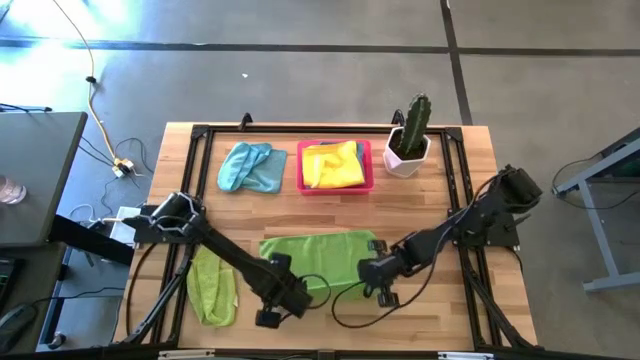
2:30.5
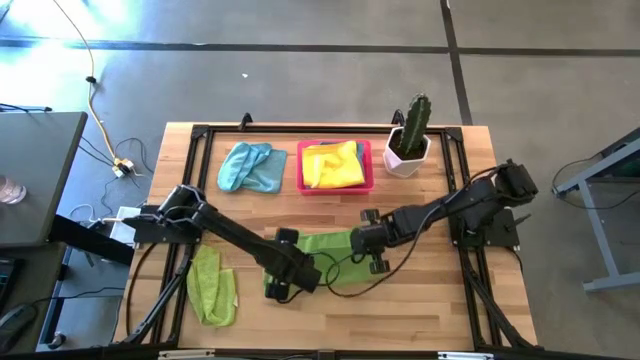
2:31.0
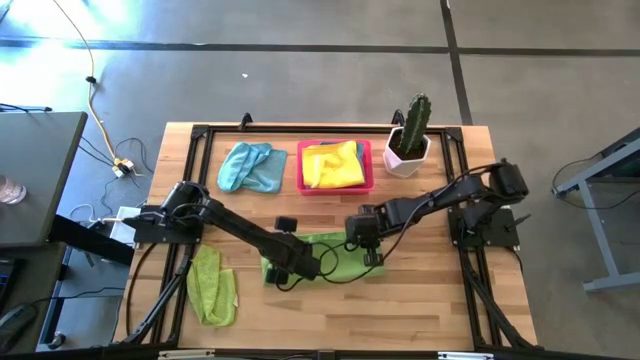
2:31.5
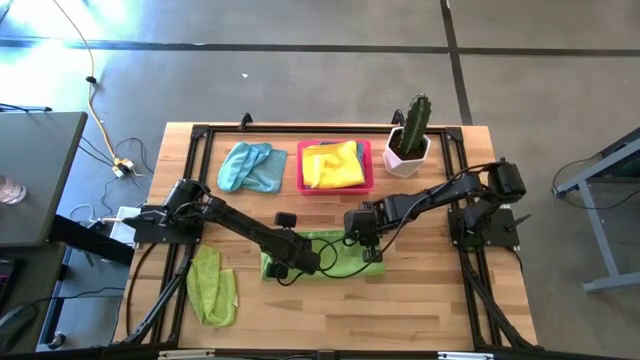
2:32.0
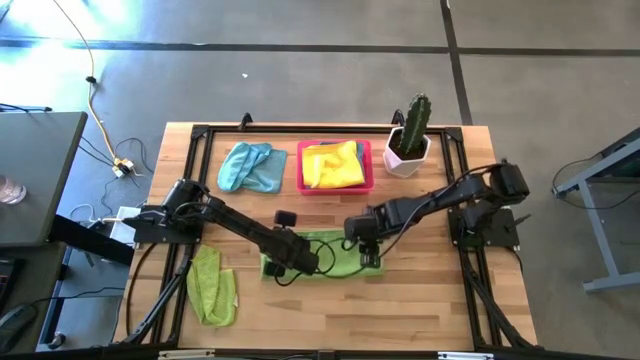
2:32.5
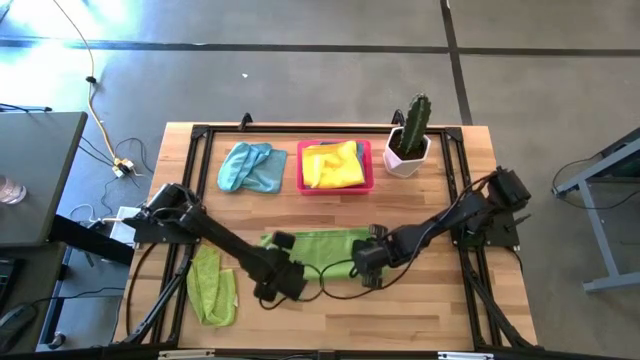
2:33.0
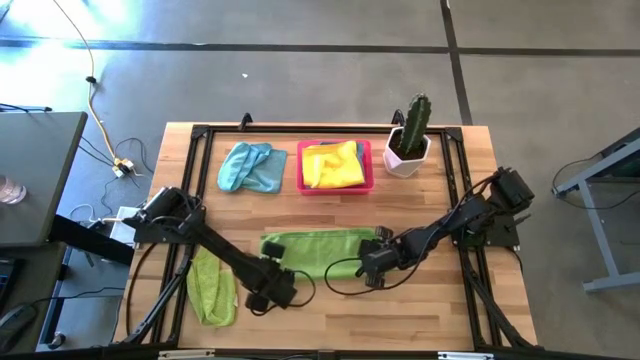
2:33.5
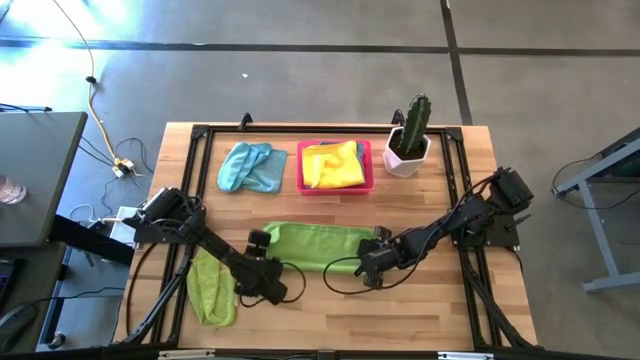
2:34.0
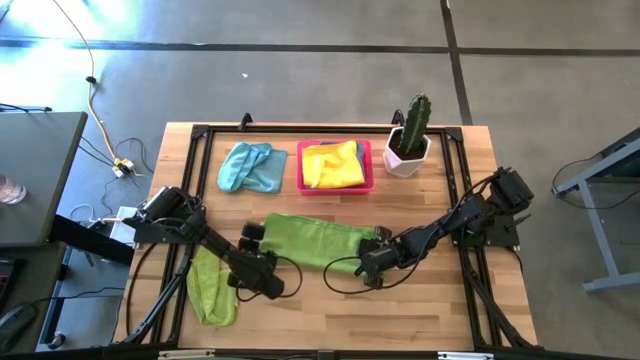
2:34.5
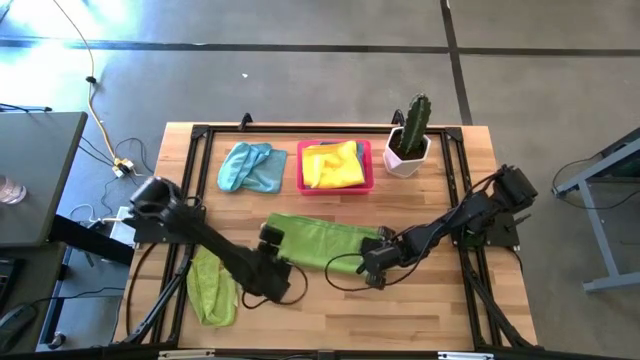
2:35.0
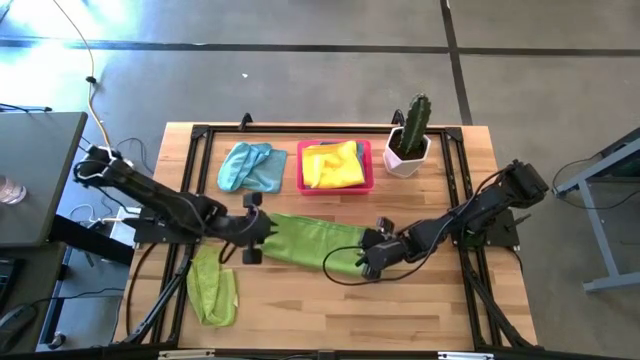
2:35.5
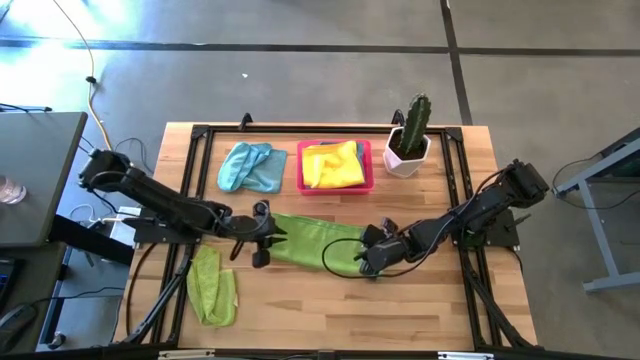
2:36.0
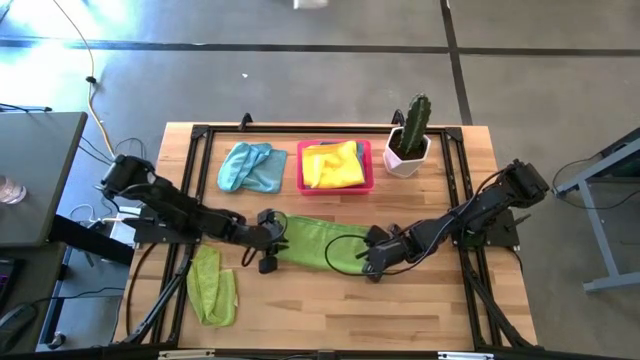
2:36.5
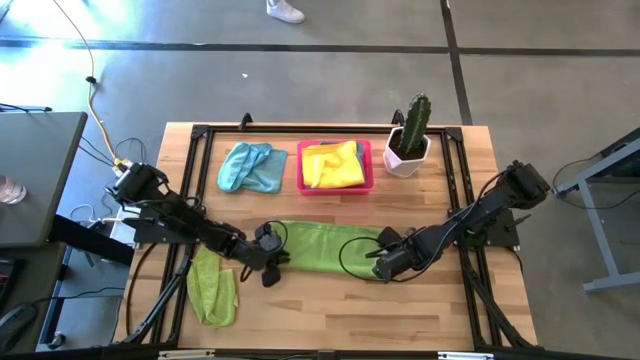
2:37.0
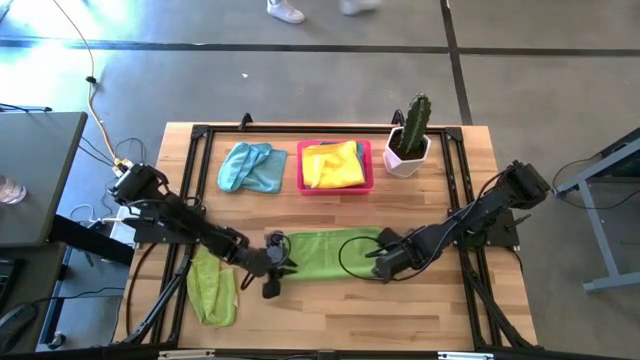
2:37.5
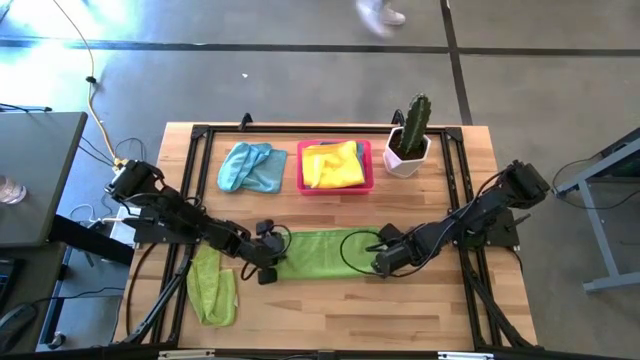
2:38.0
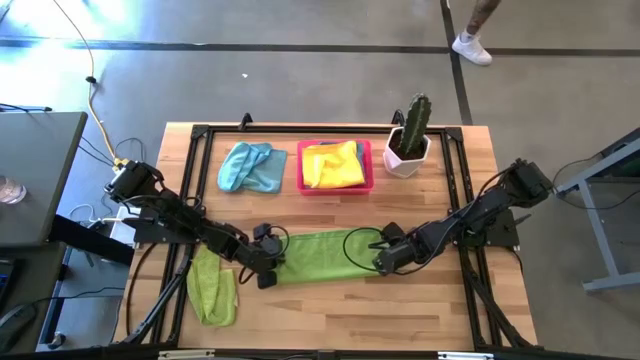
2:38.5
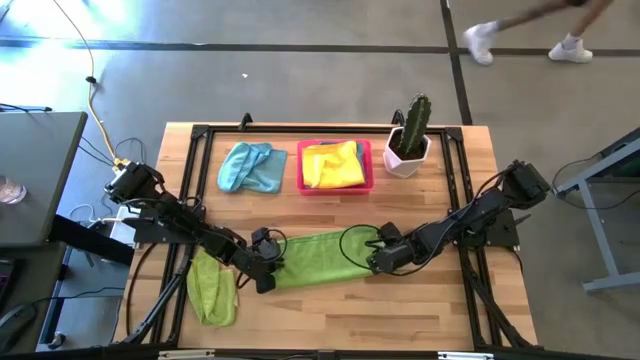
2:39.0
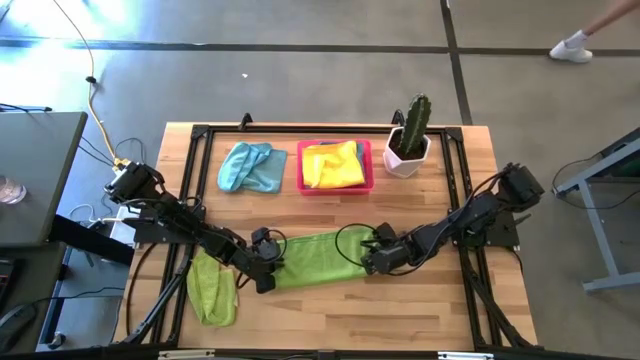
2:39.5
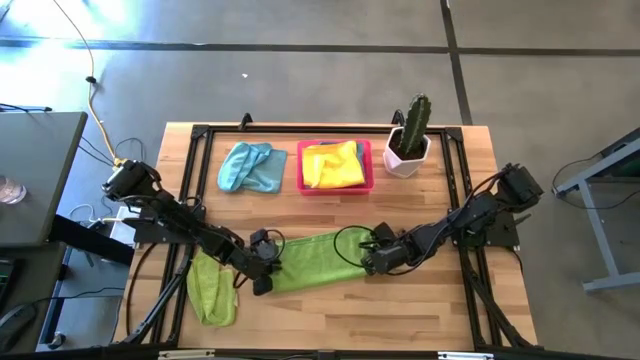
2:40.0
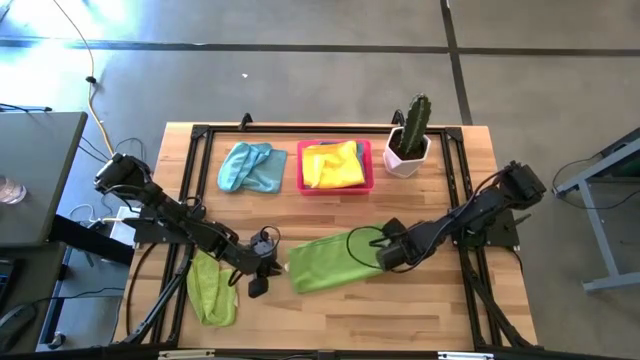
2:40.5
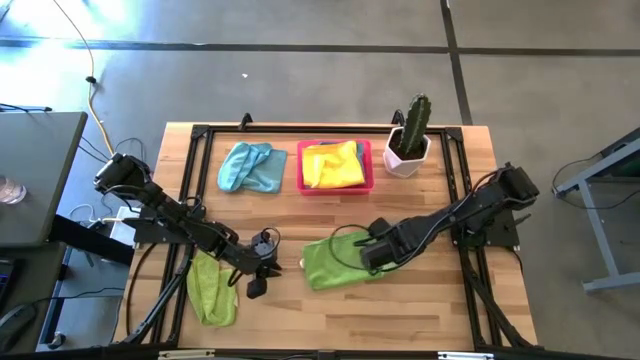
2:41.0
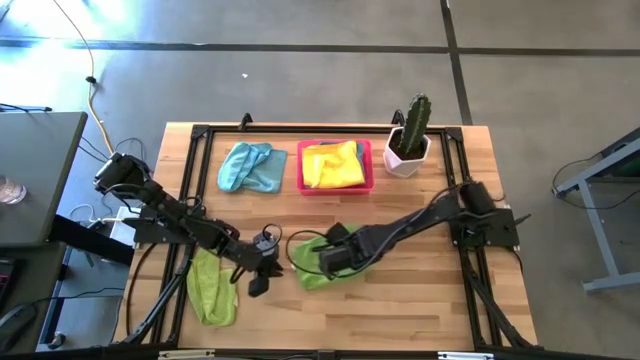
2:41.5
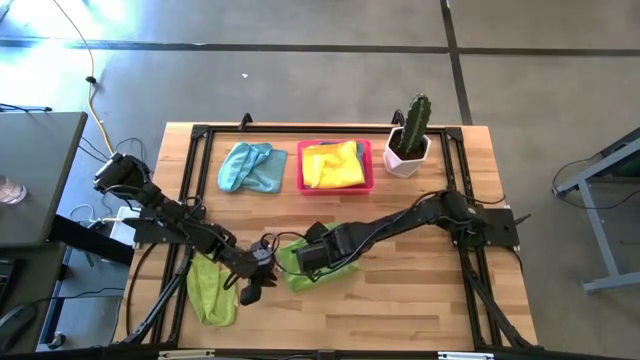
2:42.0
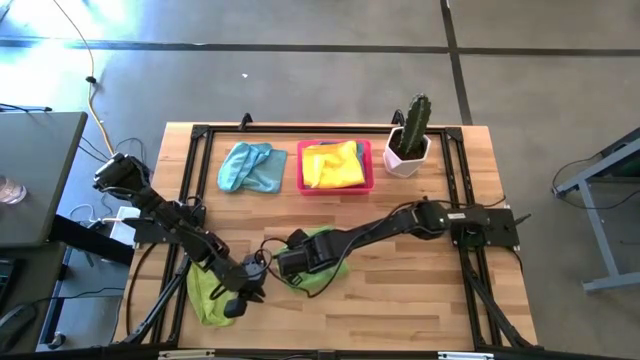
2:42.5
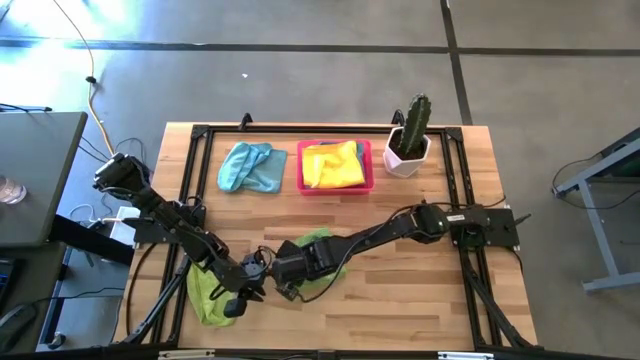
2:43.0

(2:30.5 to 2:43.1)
Task: Fold microfiber towels
Fold the green microfiber cloth

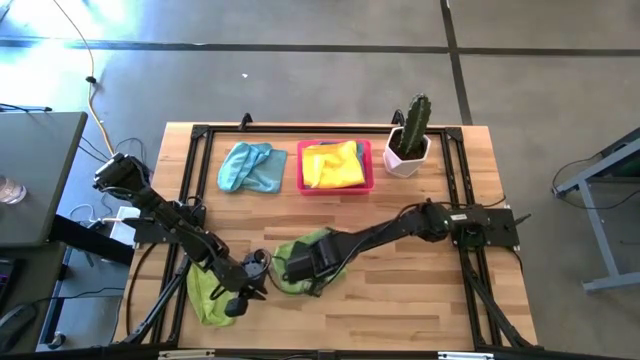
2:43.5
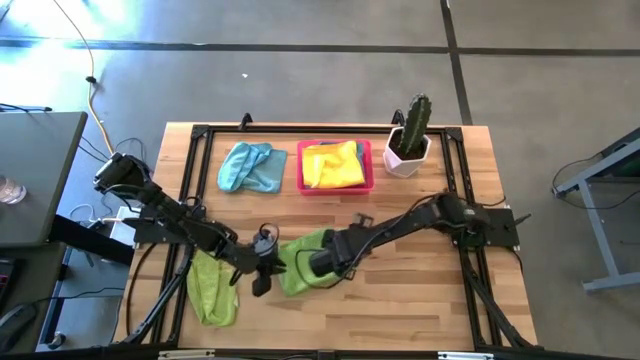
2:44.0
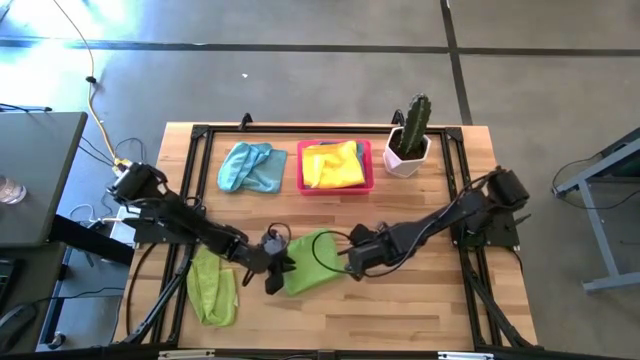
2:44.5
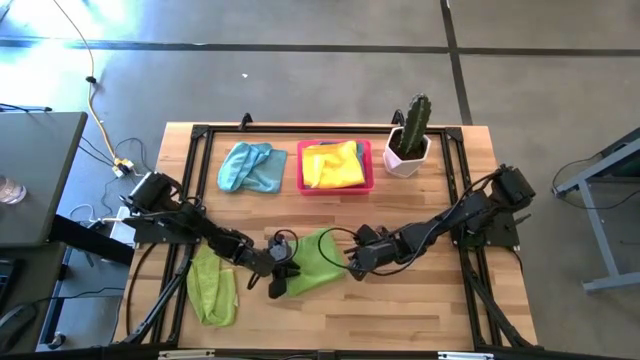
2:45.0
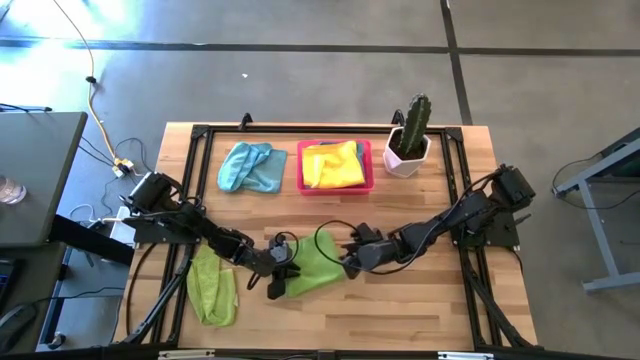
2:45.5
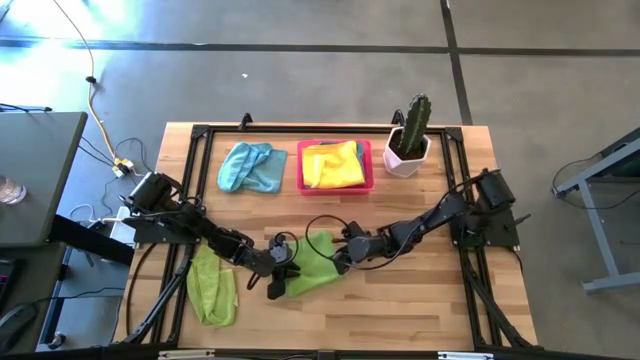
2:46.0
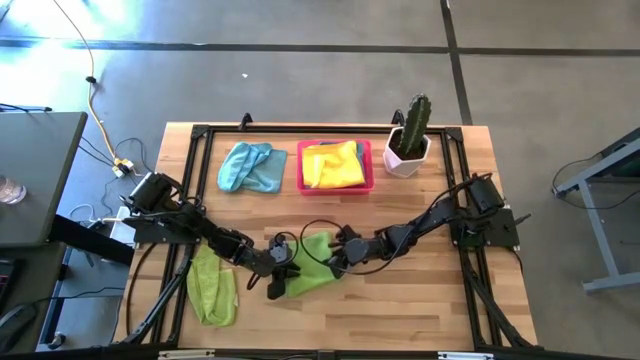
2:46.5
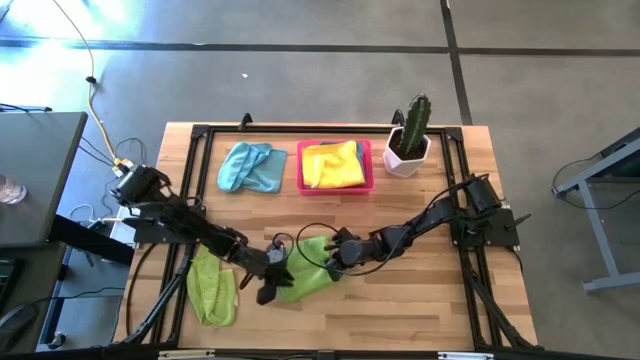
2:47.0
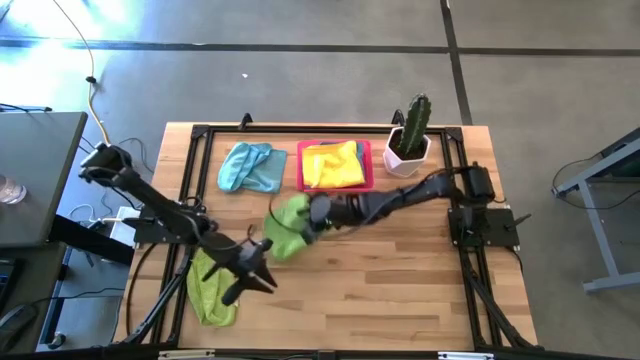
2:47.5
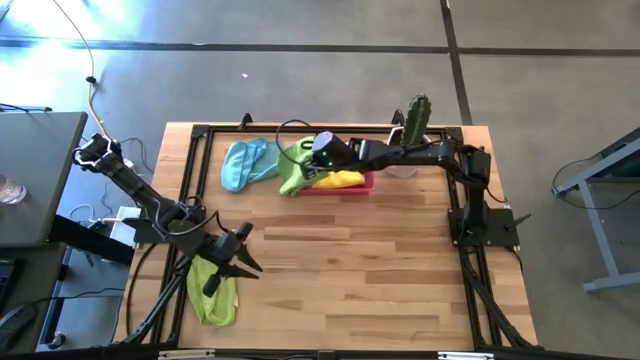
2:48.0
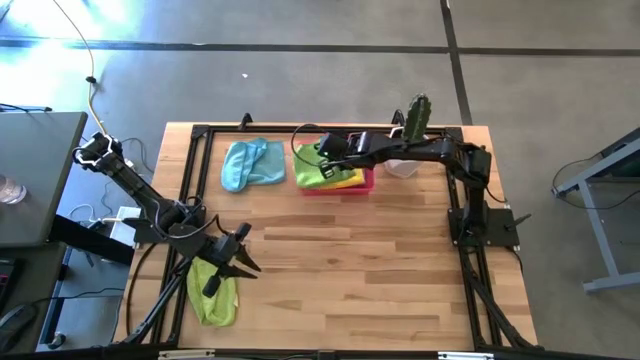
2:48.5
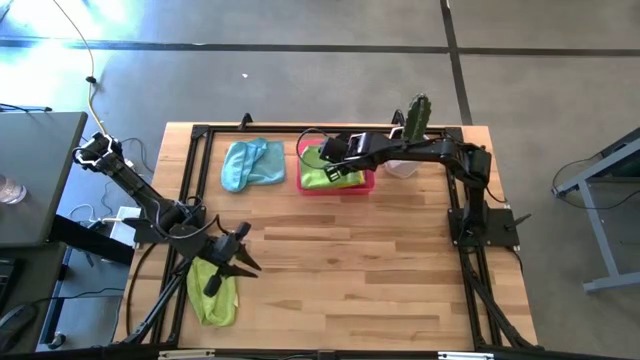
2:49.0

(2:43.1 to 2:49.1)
Stack the folded green microfiber cloth on top of the yellow microfiber cloth in the pink bin

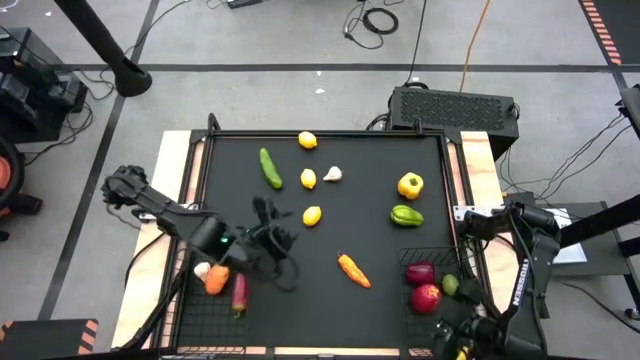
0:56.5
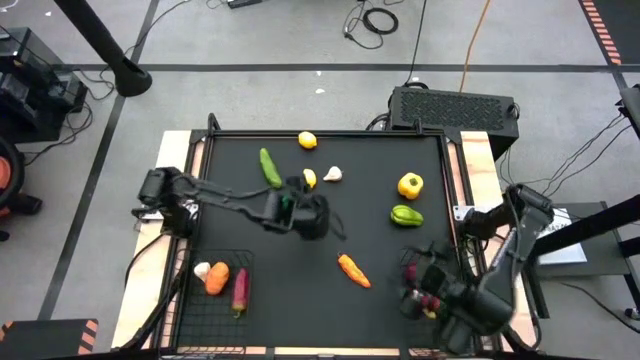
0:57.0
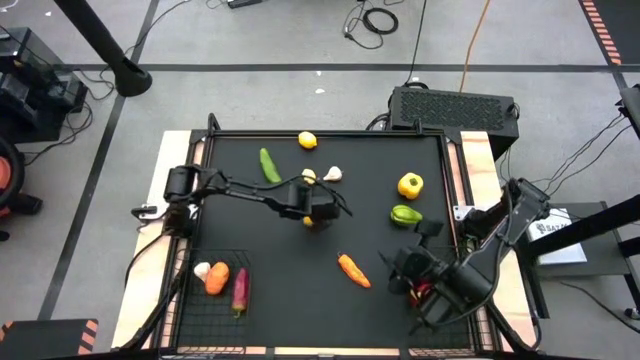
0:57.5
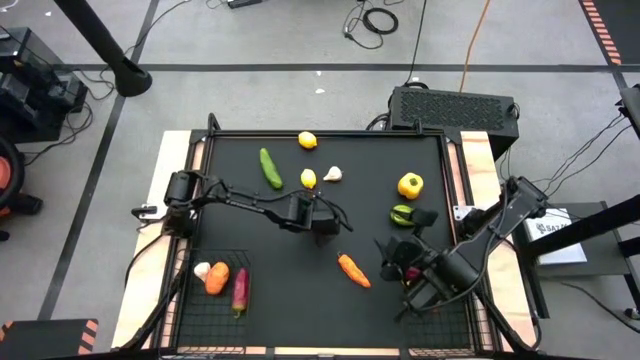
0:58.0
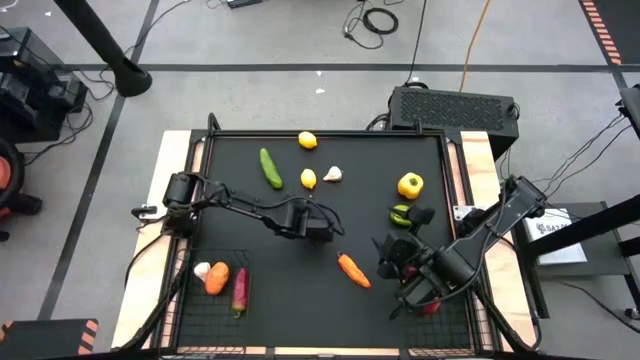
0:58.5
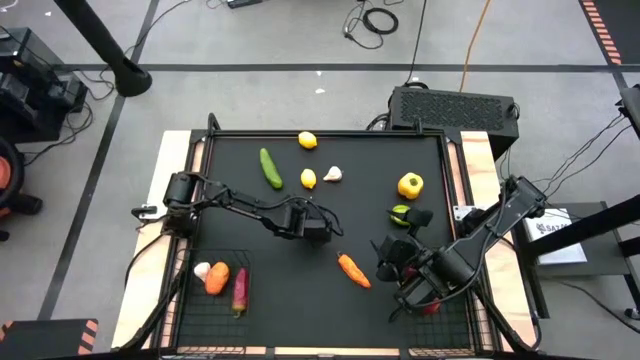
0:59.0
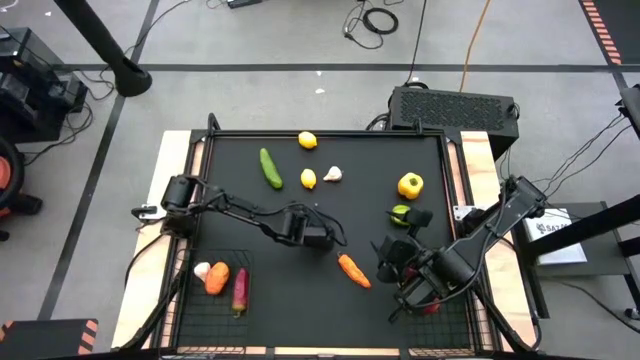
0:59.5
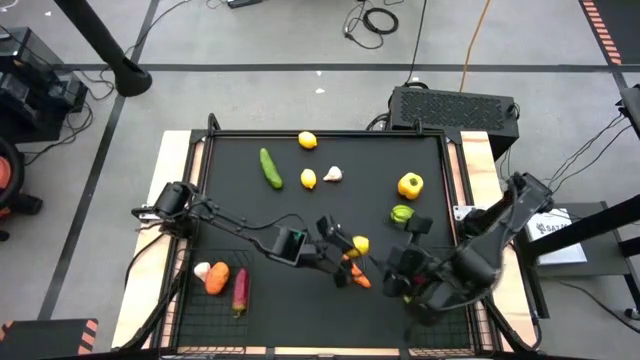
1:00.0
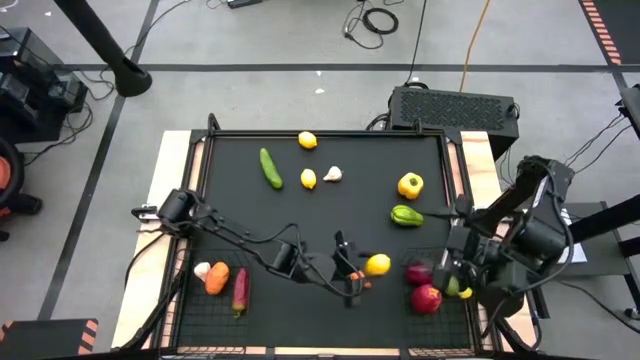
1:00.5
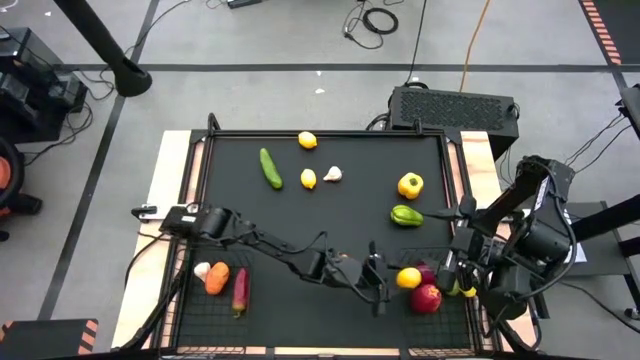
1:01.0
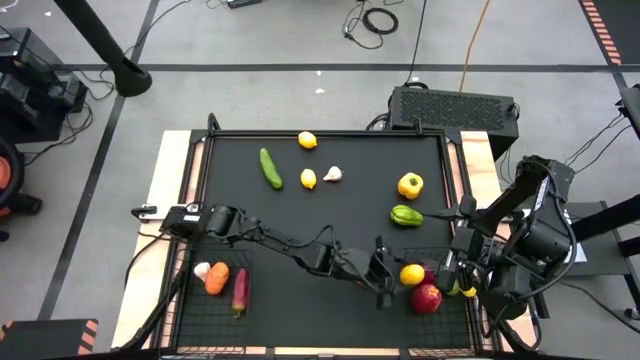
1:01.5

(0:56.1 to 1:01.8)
Task: Sort produce into baskets
Put the bottom lemon into the bottom right basket
